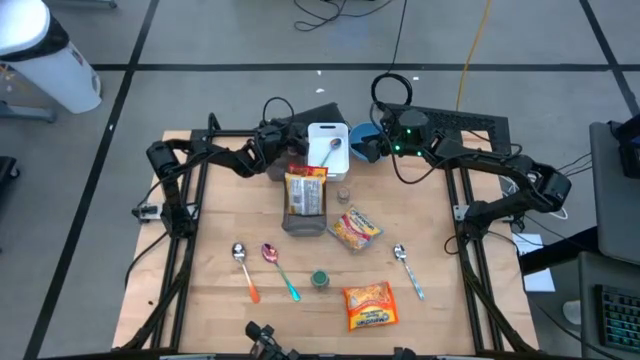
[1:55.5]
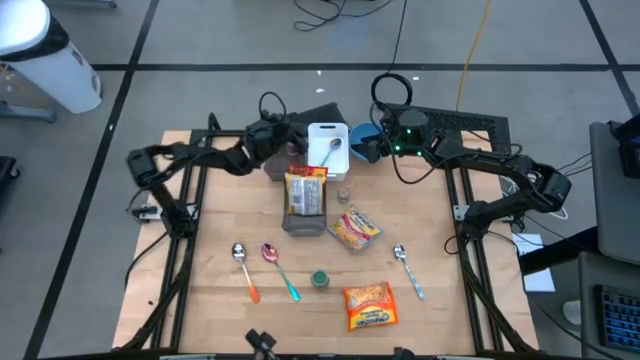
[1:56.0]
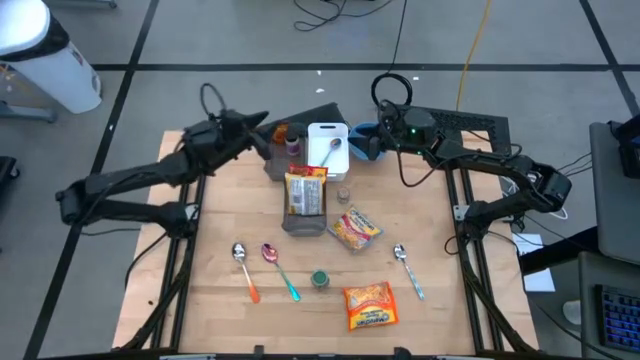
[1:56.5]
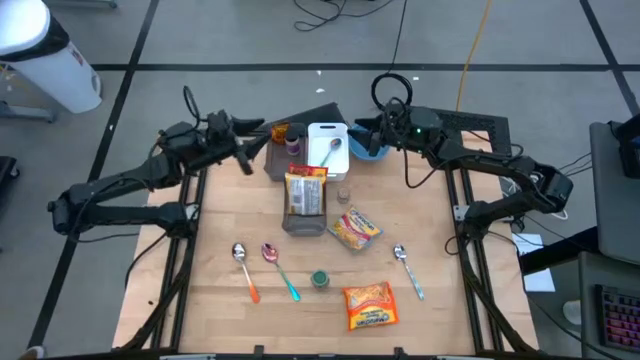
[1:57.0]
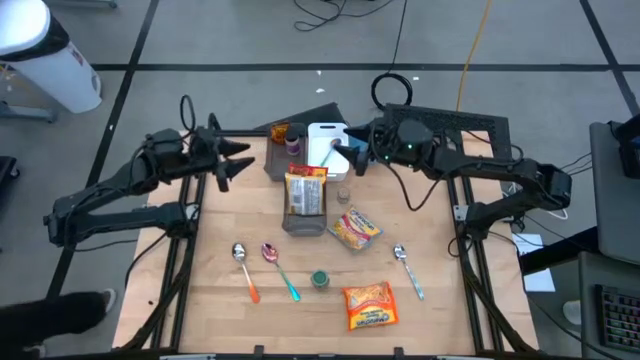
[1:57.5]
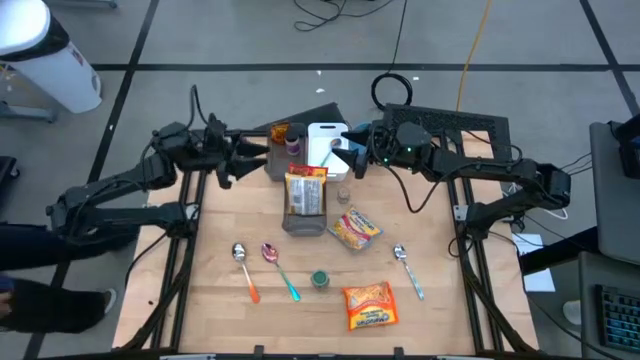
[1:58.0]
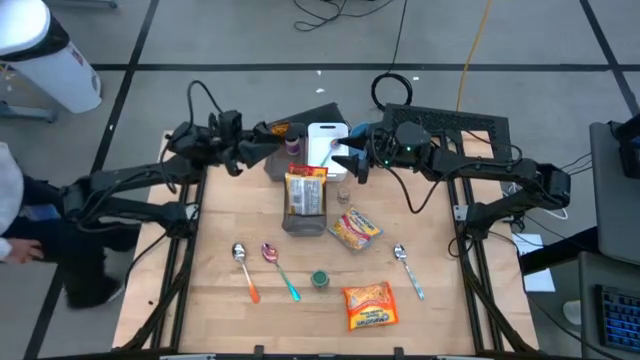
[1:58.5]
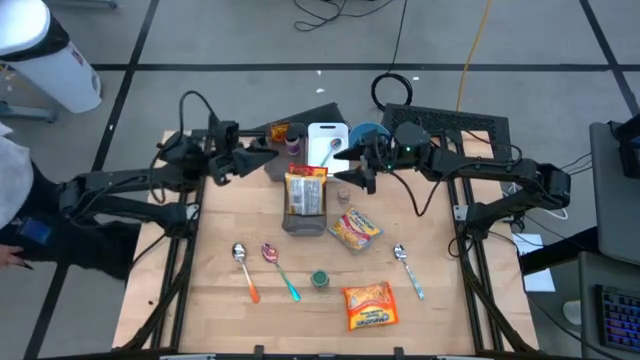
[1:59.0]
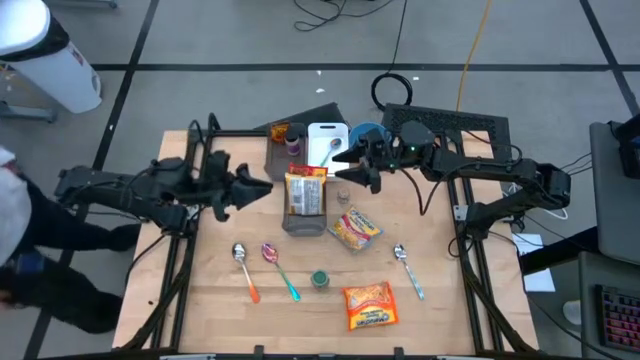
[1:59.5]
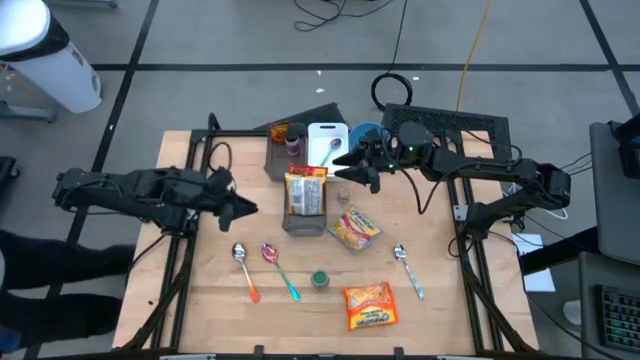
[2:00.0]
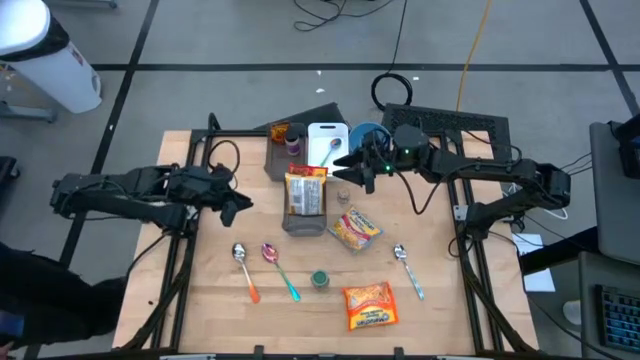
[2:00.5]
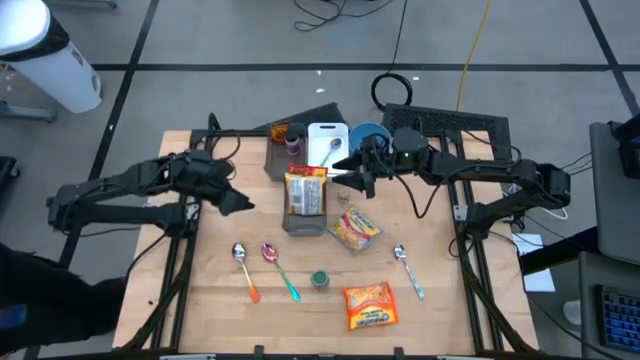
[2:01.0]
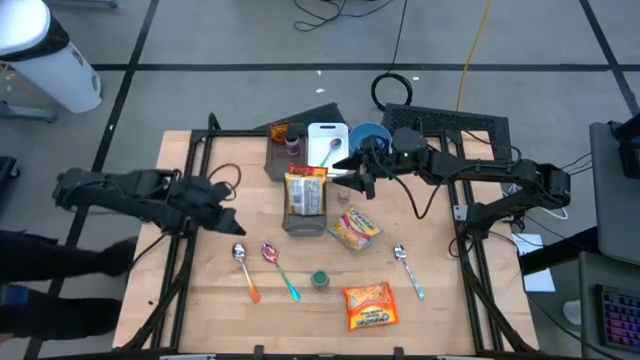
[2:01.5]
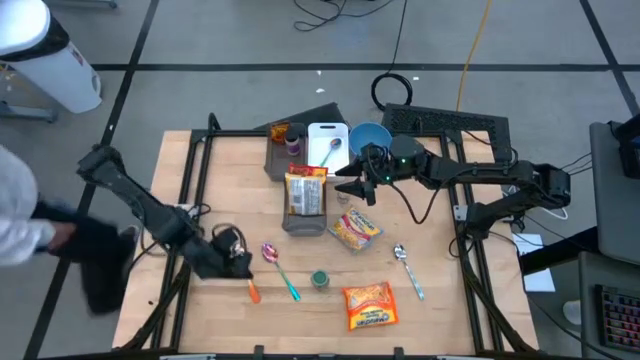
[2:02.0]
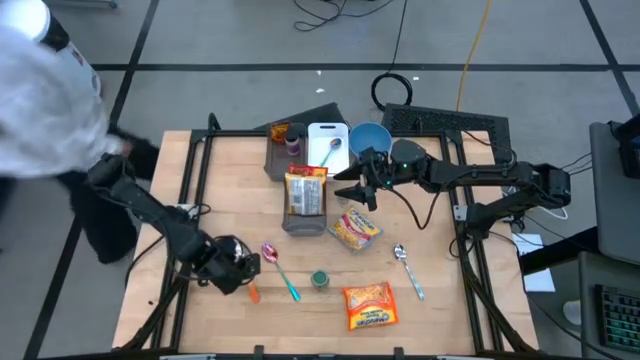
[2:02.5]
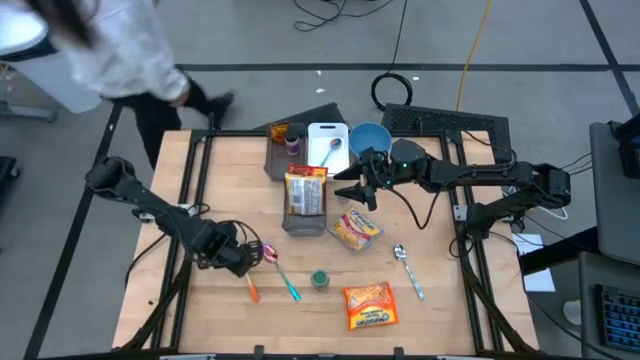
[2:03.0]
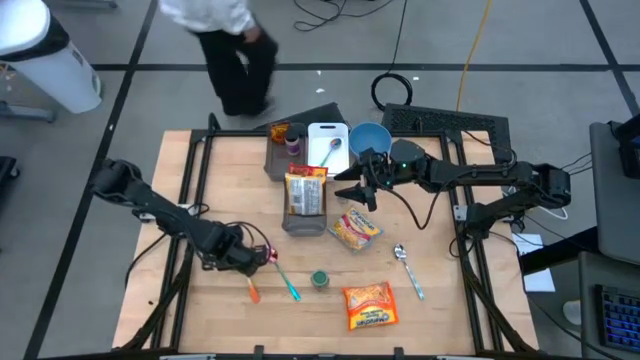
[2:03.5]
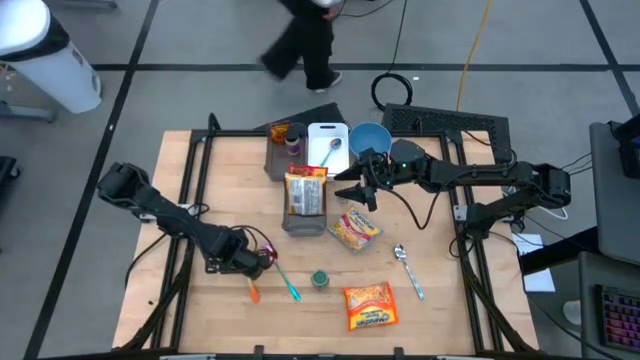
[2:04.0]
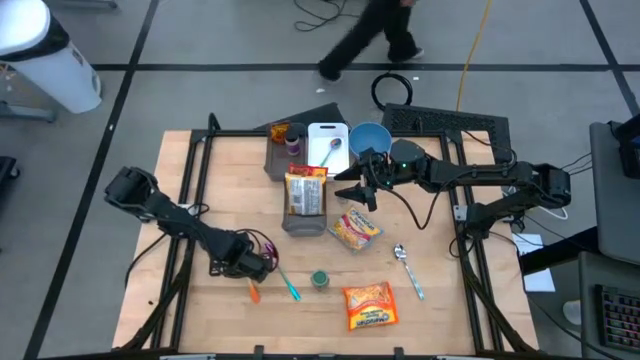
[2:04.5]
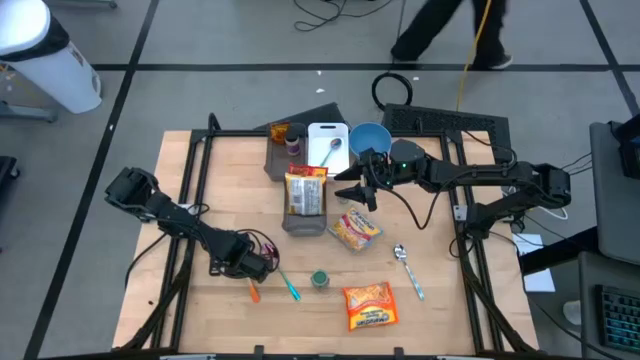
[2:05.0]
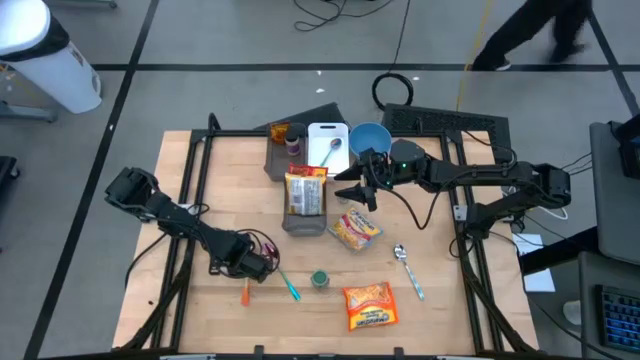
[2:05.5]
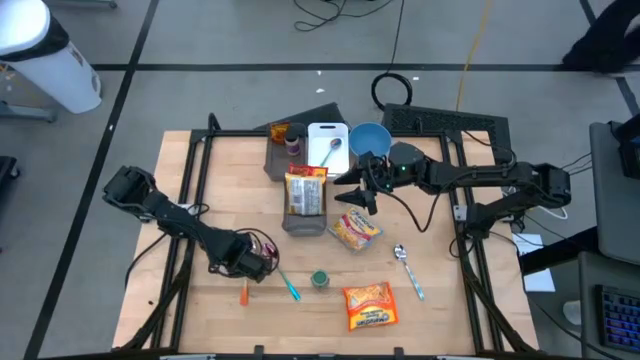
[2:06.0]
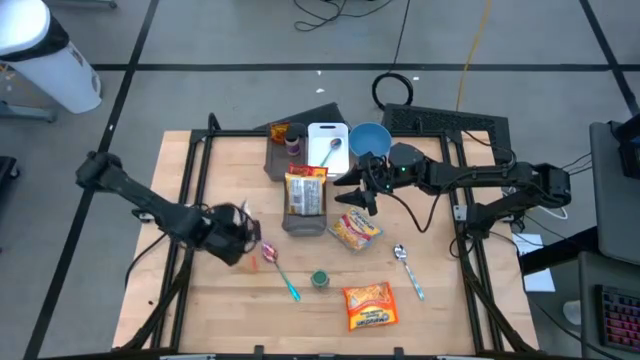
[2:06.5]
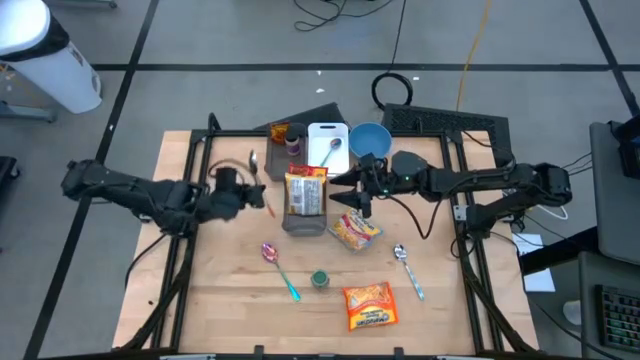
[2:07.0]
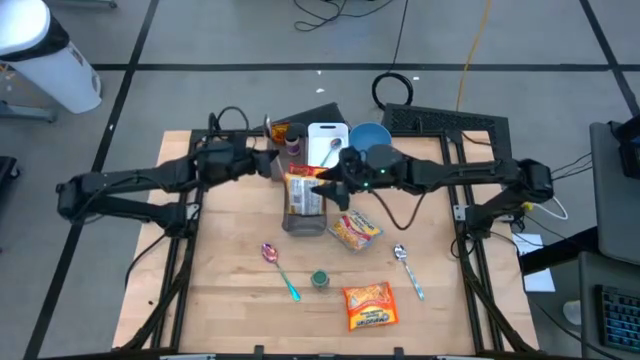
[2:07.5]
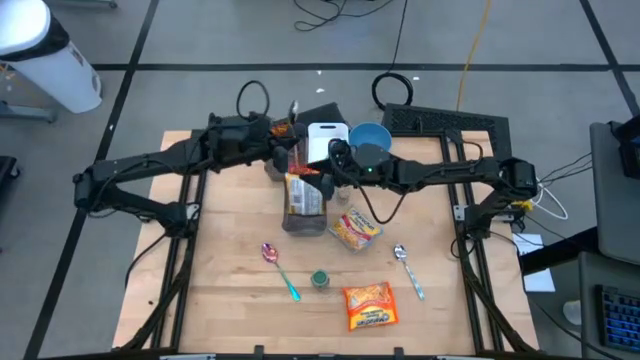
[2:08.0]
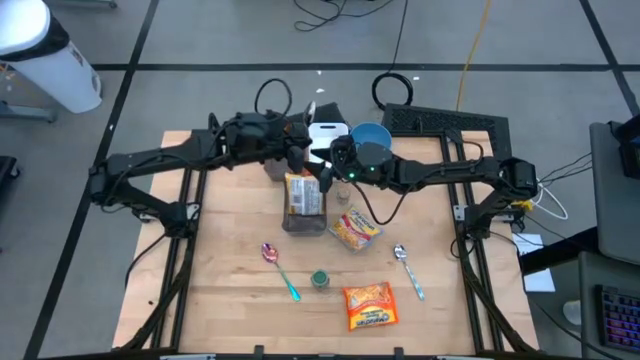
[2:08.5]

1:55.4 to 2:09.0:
Task: Pick & Place Food Item
Put the orange spoon into the white bin

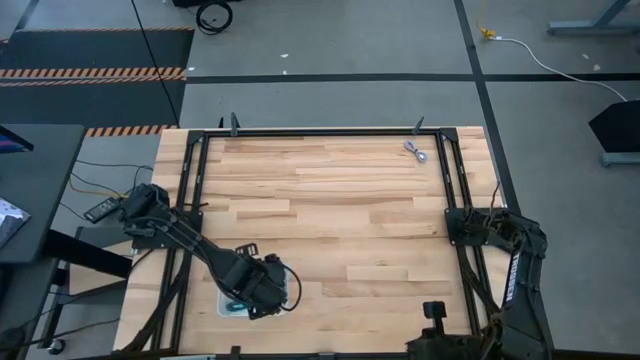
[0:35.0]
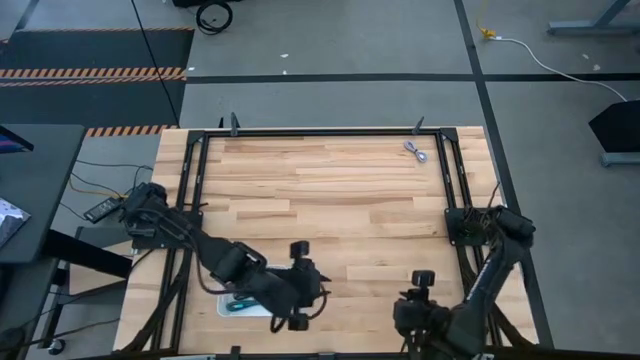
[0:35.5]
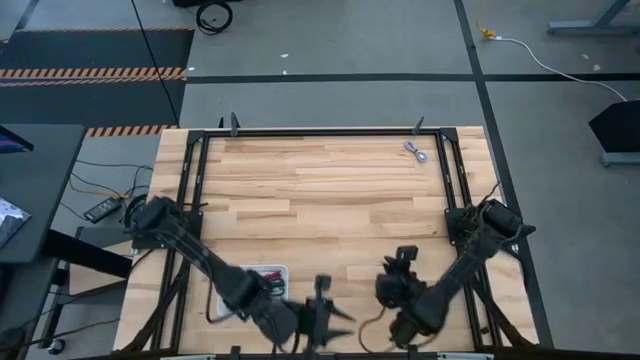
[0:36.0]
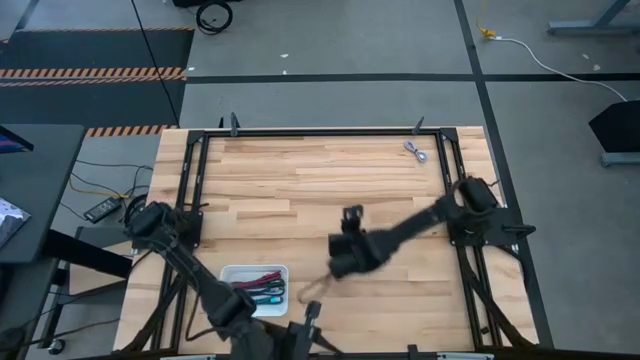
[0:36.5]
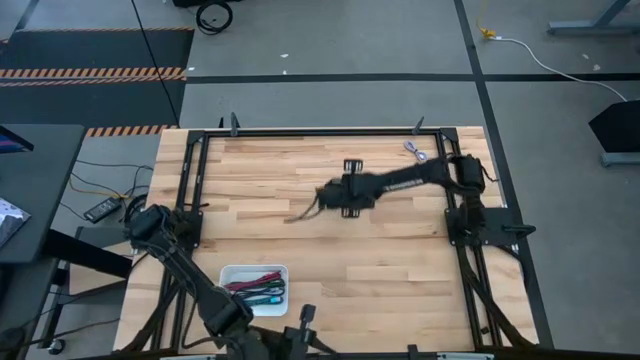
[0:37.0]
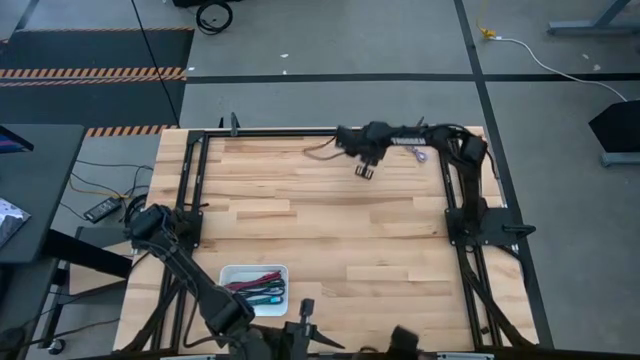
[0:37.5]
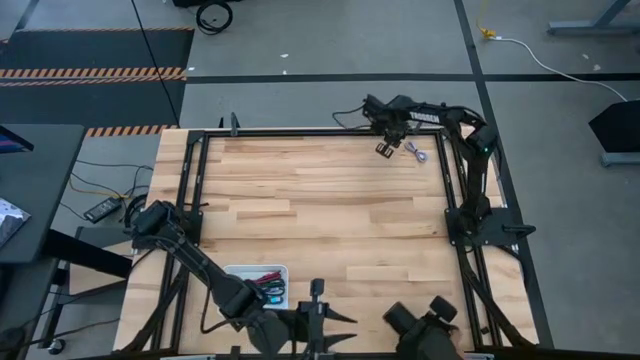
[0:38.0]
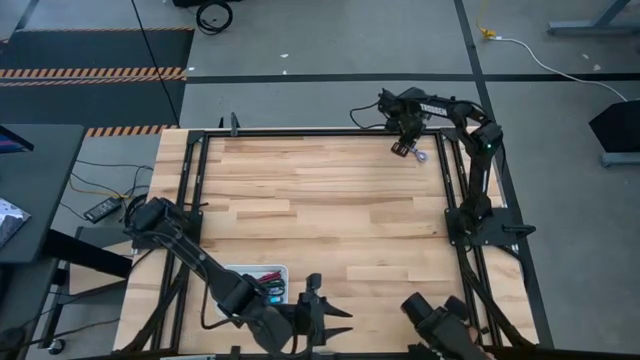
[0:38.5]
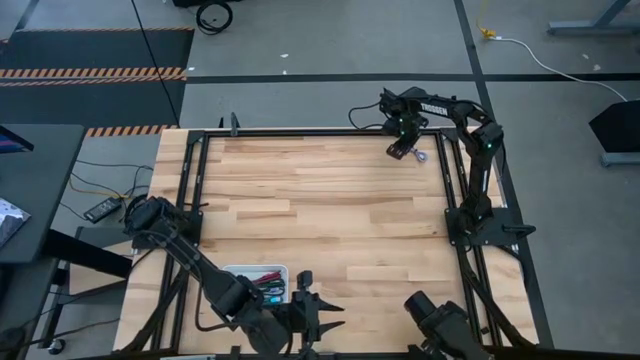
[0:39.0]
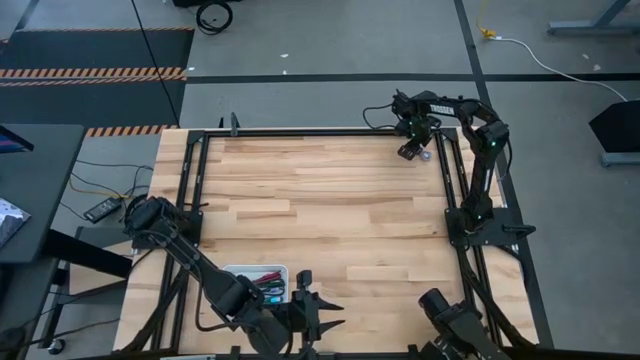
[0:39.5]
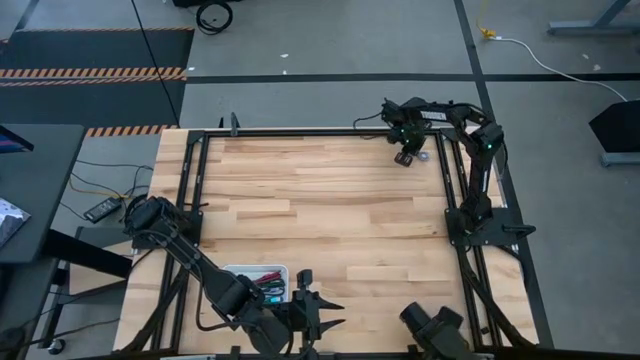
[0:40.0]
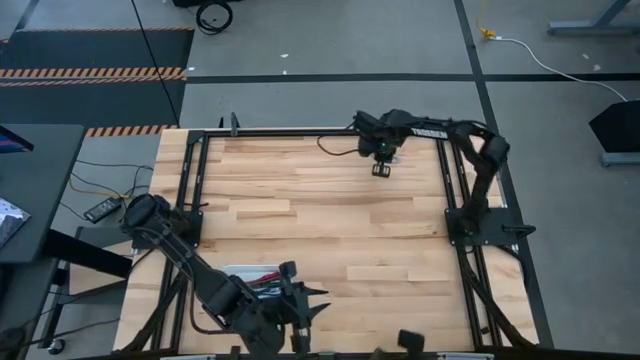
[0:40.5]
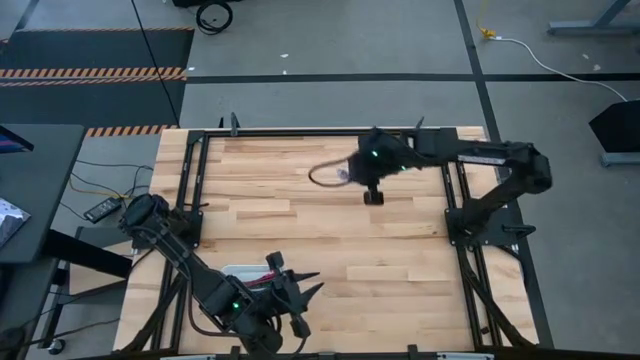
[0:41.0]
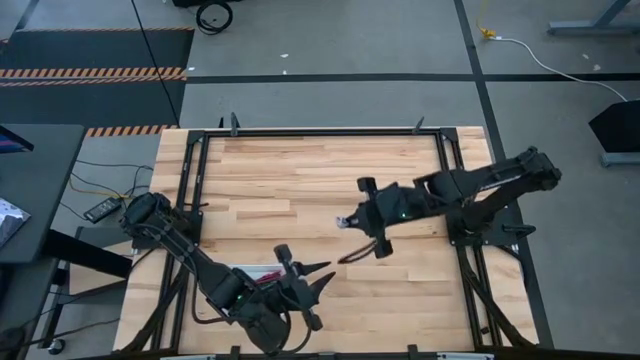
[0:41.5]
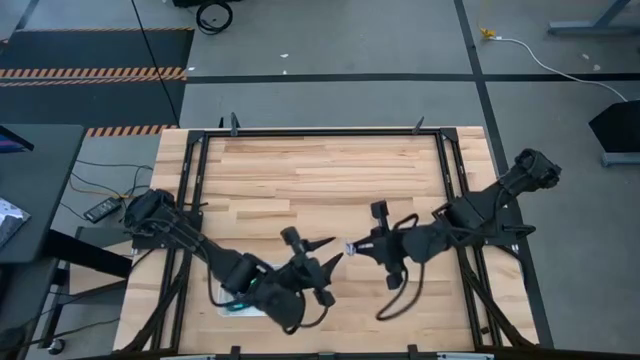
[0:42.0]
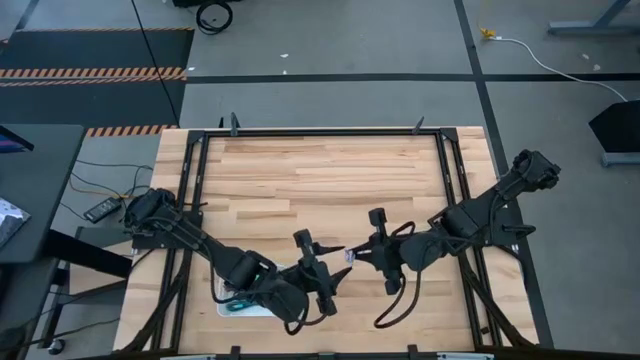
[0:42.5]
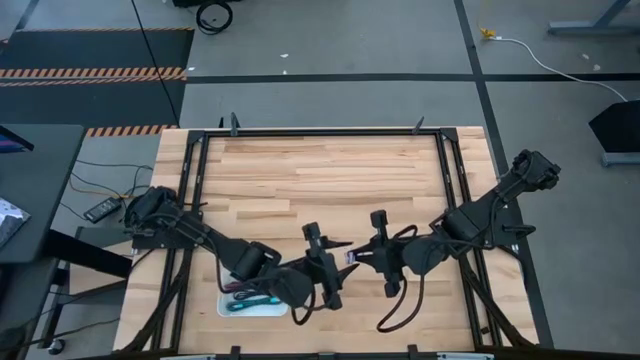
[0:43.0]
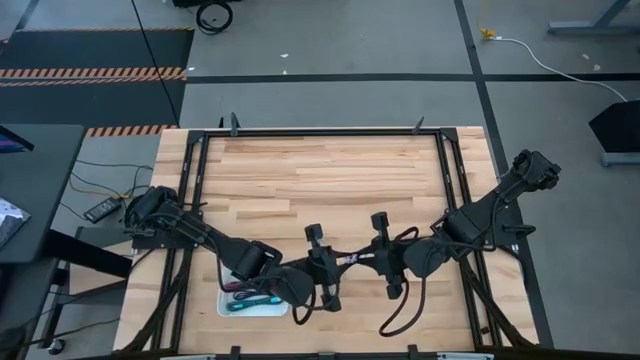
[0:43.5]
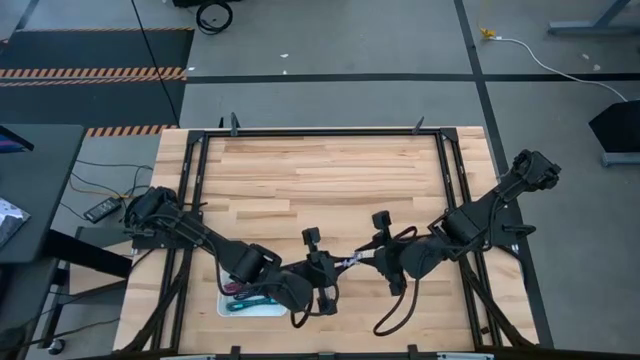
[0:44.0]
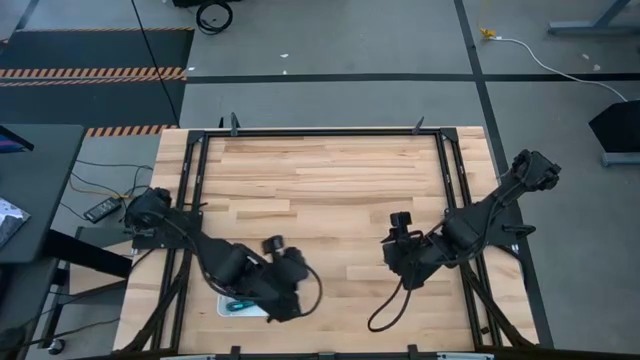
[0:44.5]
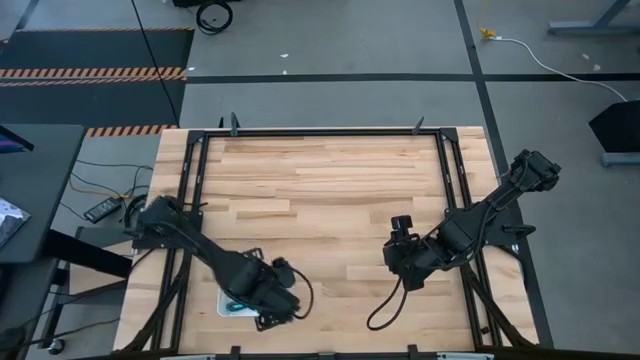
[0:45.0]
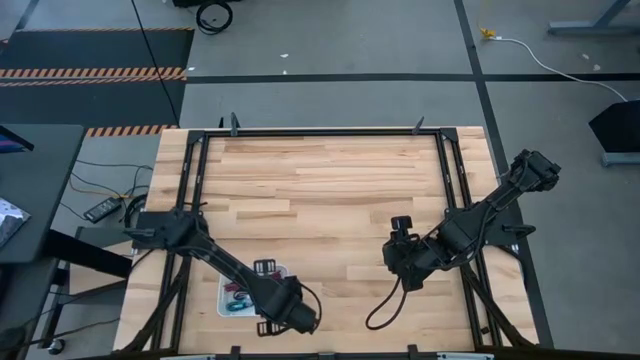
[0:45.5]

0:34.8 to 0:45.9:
Task: Pick and place USB-C Cables
Put the white charger cable into the white bin
